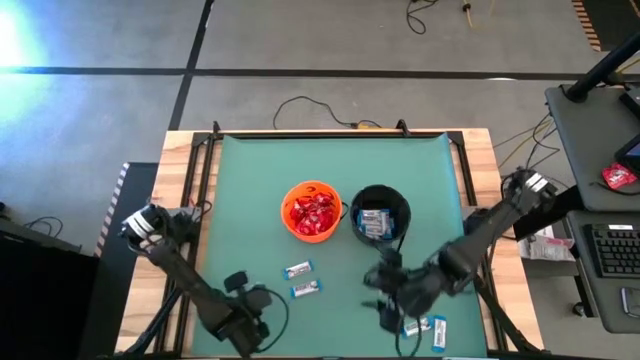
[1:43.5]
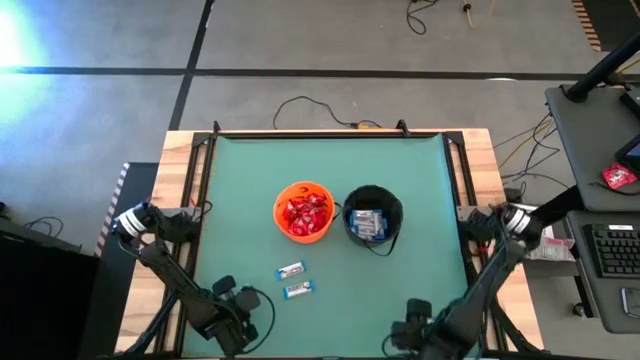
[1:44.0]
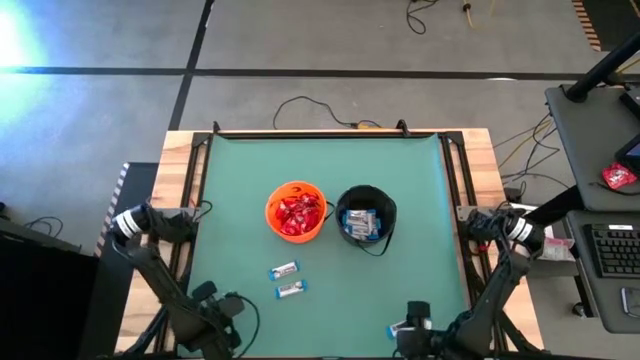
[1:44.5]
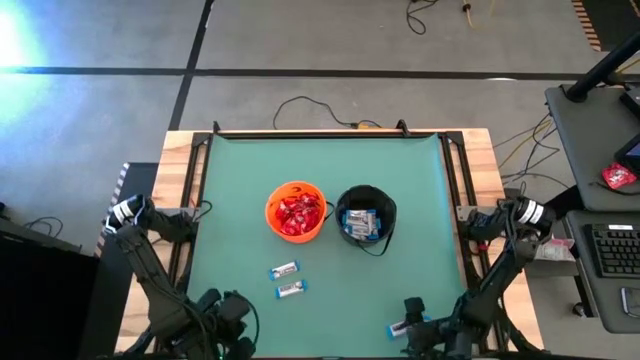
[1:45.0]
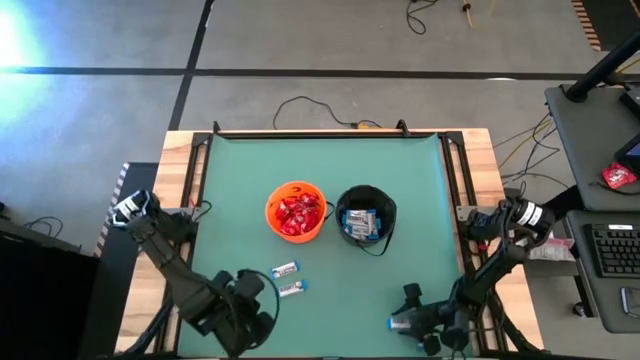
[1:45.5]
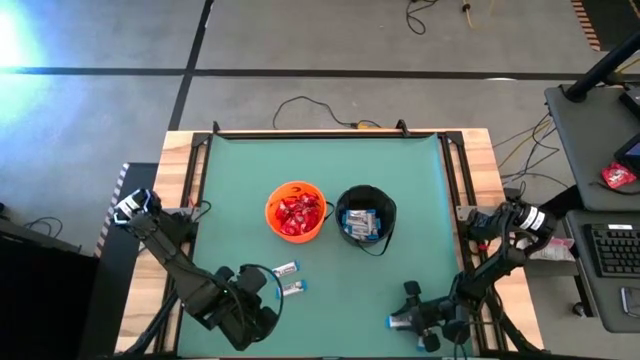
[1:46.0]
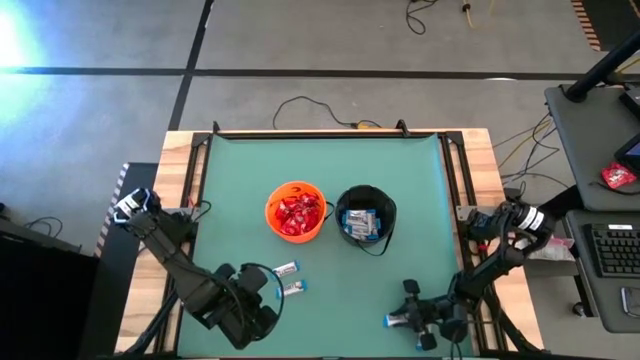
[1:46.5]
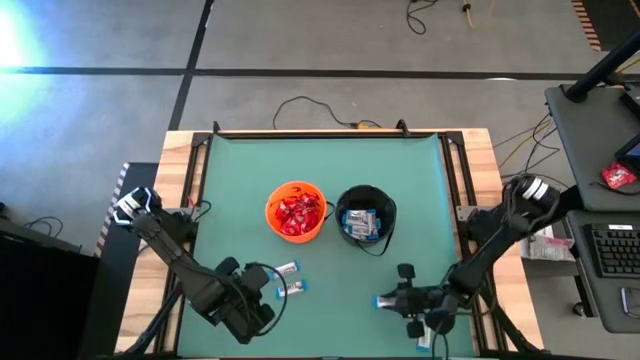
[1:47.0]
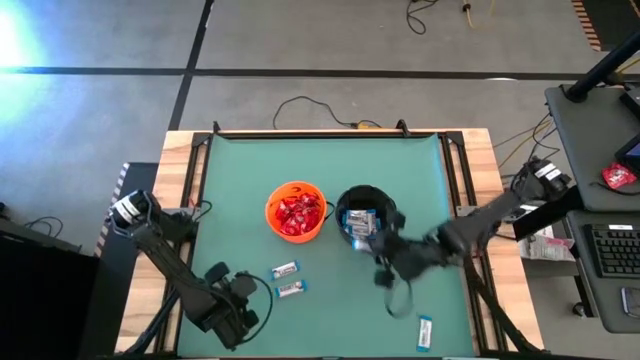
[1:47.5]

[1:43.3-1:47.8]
Task: Sort candy by brand, put in halloween buckets
Put the white chocolate into the black bucket

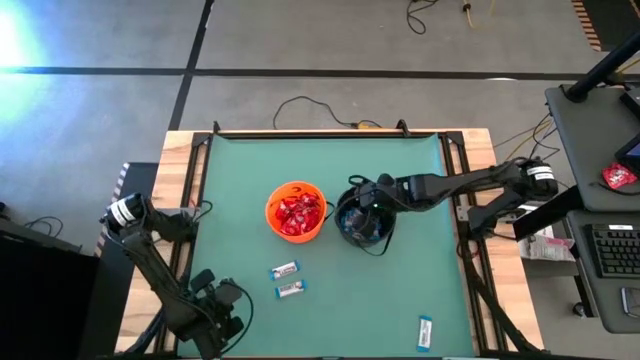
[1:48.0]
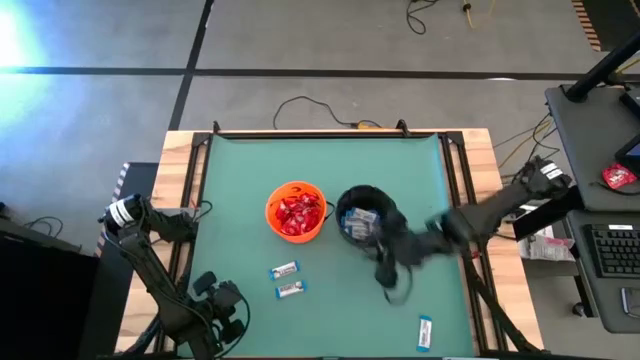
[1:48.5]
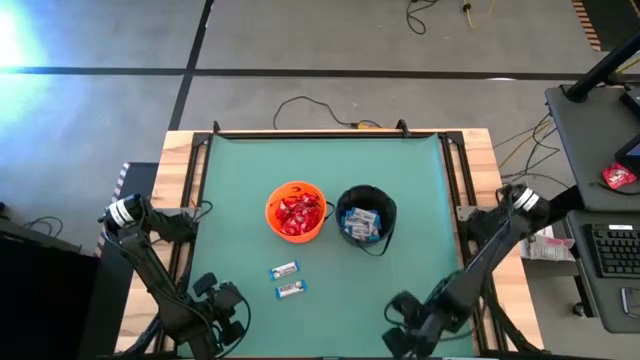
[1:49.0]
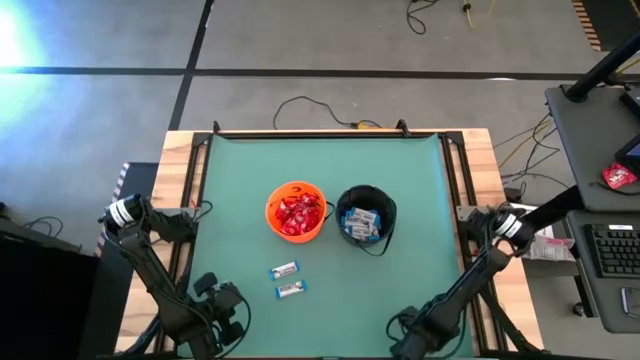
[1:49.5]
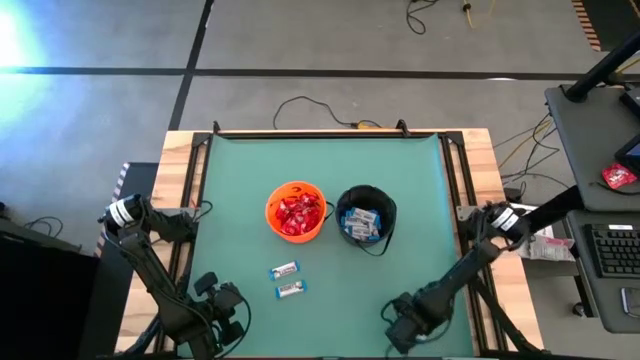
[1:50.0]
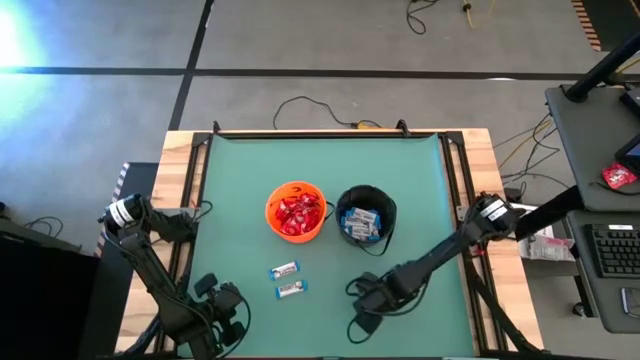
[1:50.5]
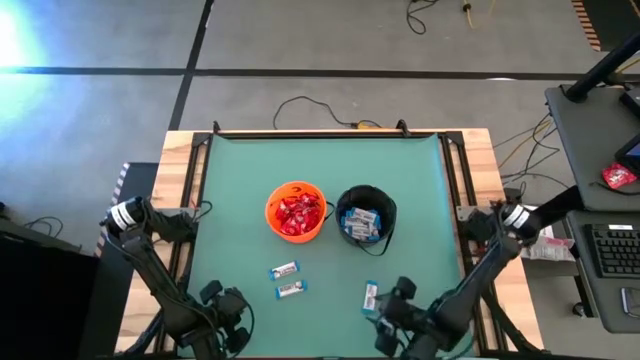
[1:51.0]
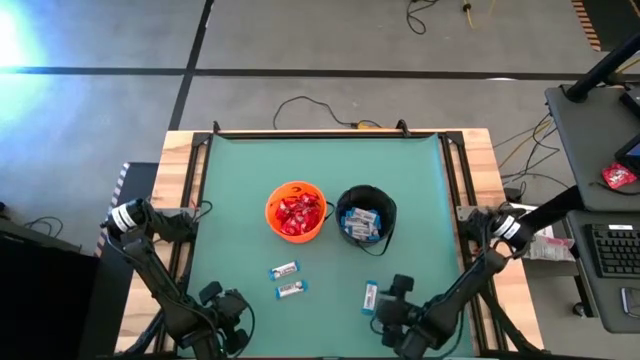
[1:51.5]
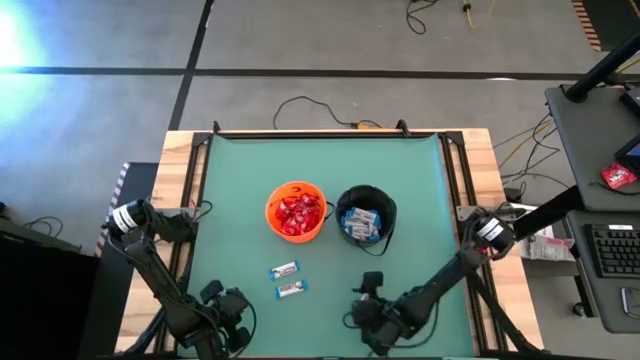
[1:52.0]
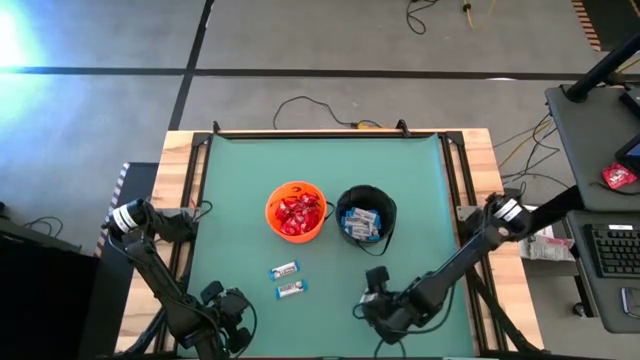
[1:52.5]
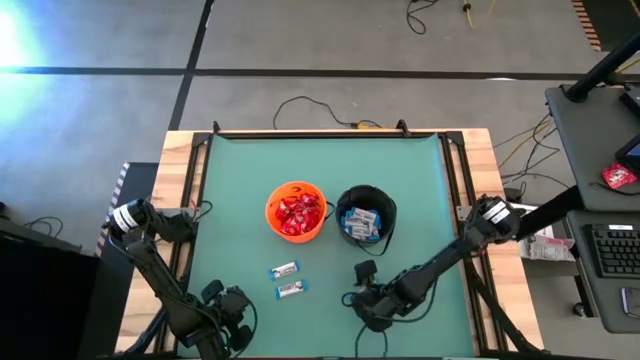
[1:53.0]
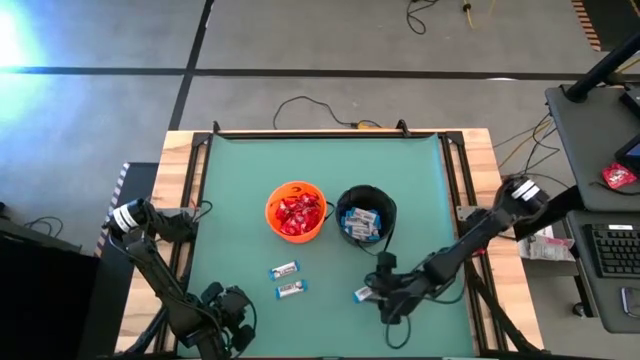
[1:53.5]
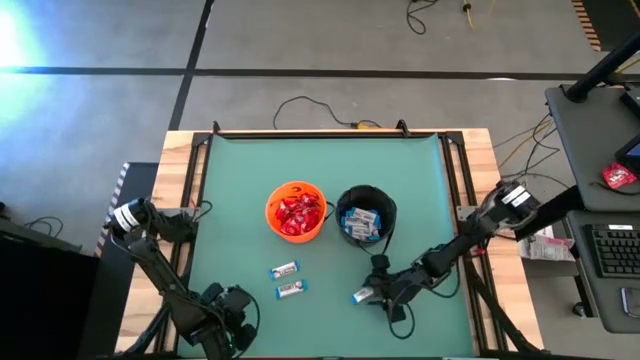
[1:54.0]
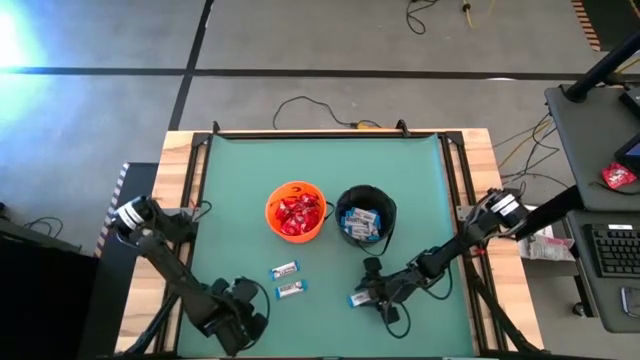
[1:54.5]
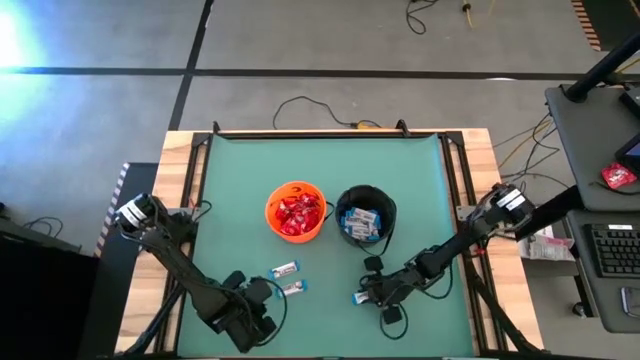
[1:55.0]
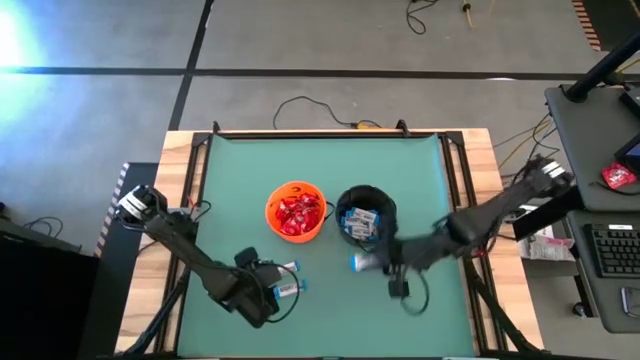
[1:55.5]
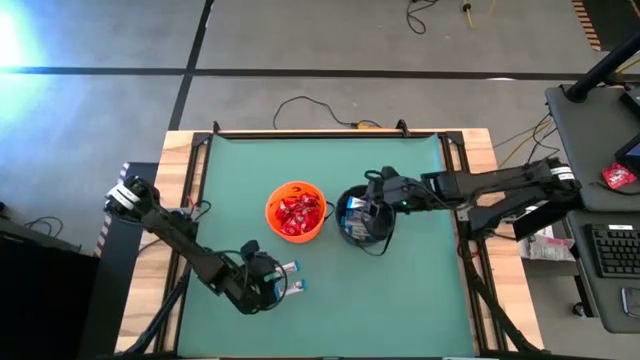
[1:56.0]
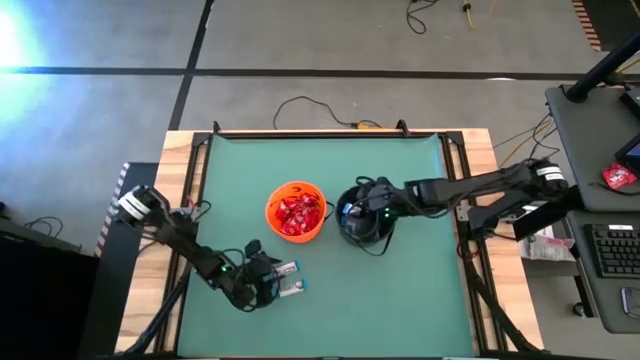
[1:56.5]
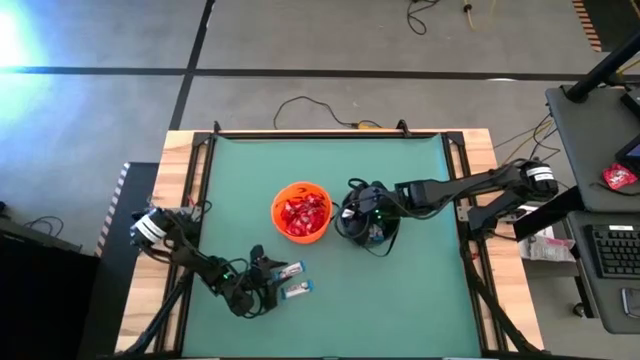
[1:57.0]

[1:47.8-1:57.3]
Put the white chocolate into the black bucket

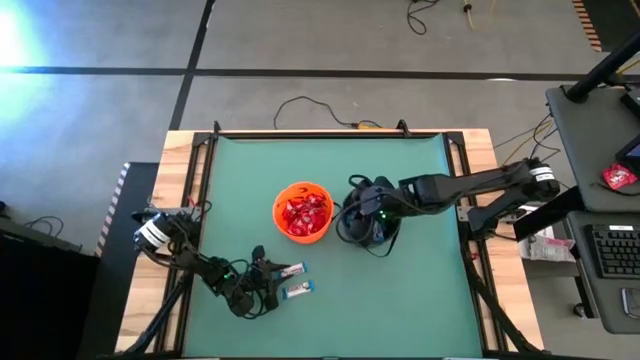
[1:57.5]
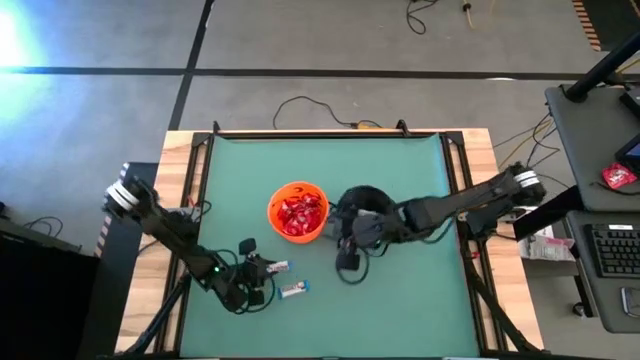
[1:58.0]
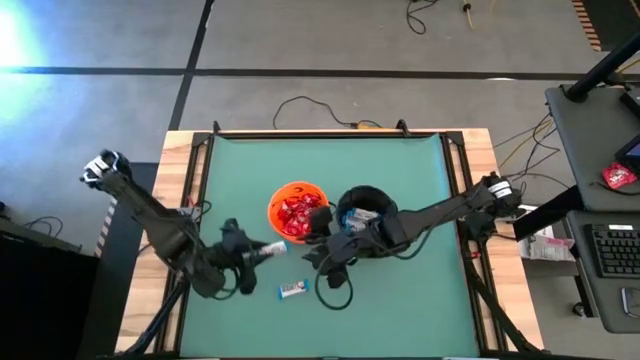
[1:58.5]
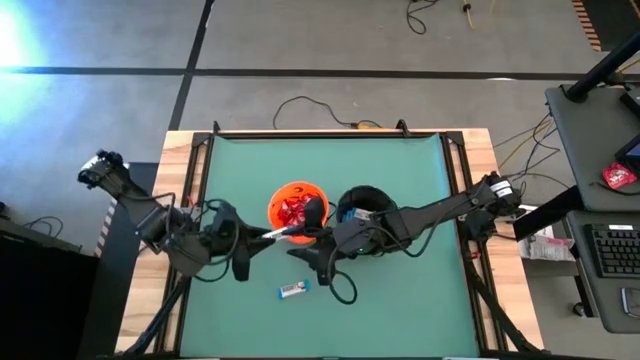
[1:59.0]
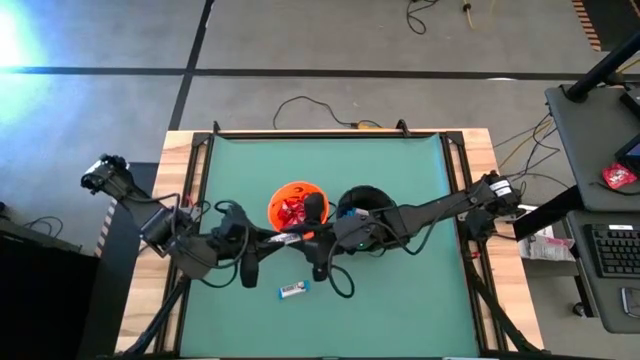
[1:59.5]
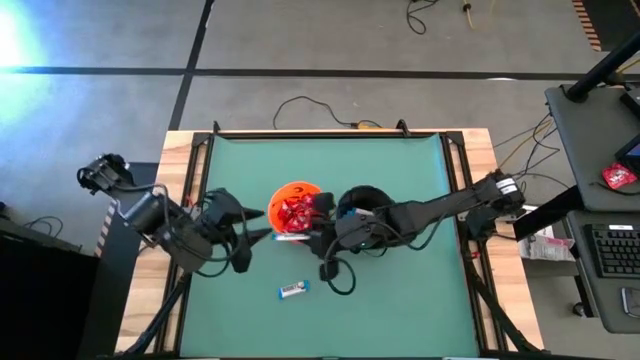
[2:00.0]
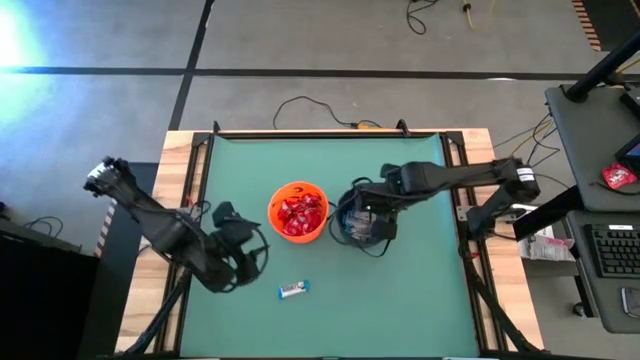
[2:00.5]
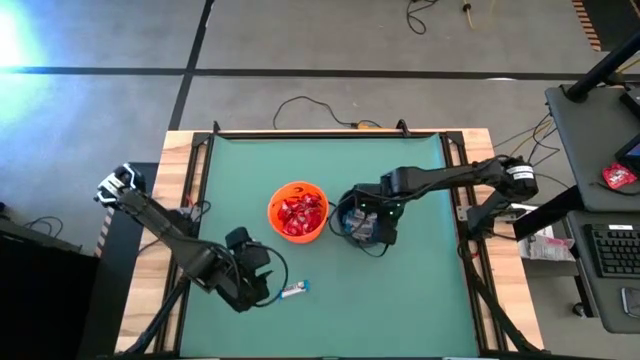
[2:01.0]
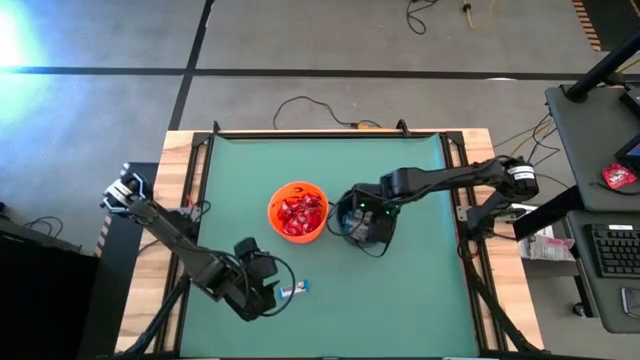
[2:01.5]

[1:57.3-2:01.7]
Put the white chocolate into the black bucket

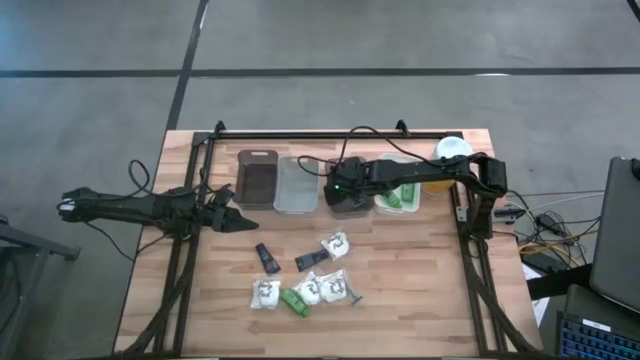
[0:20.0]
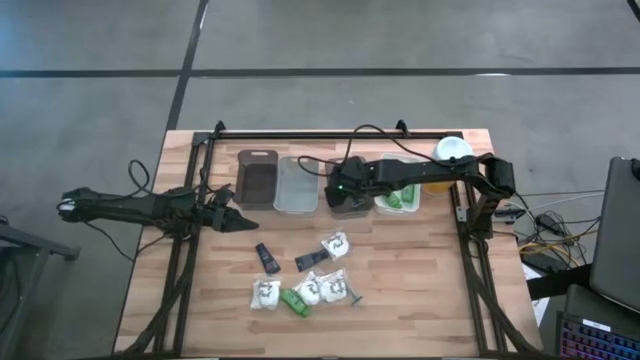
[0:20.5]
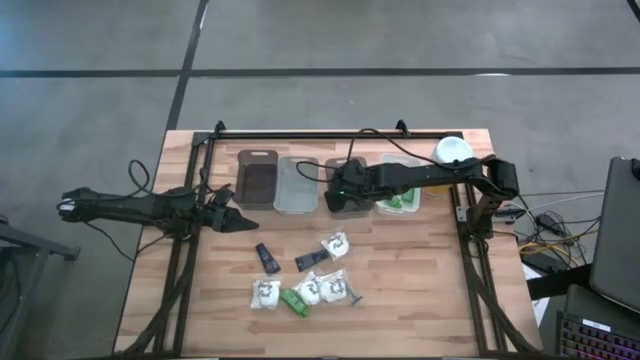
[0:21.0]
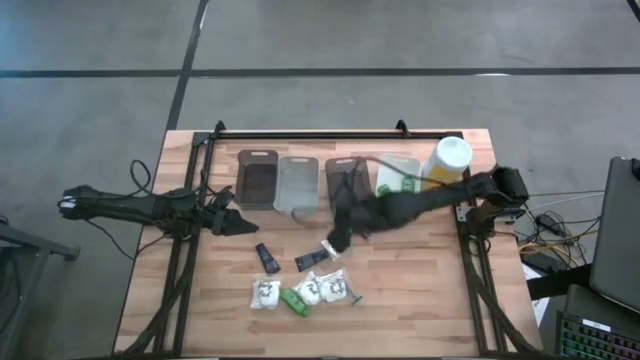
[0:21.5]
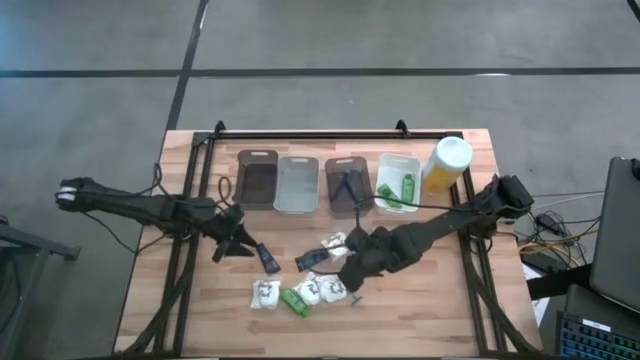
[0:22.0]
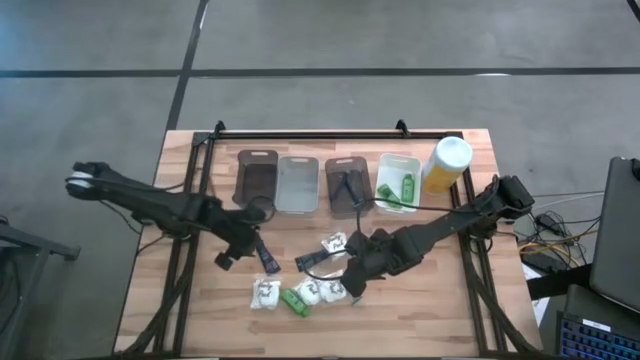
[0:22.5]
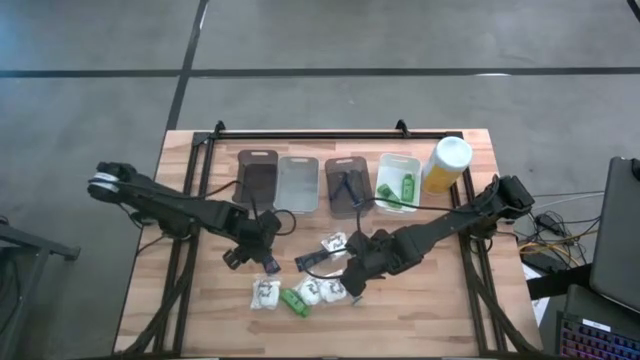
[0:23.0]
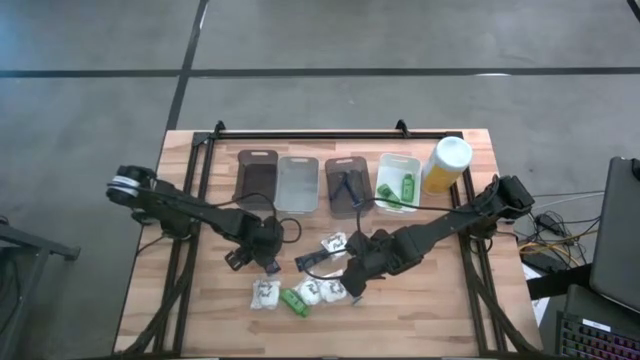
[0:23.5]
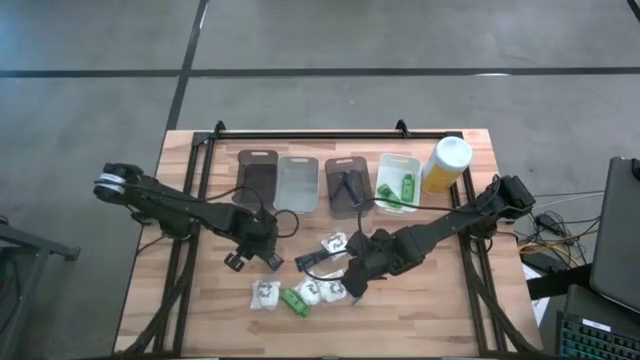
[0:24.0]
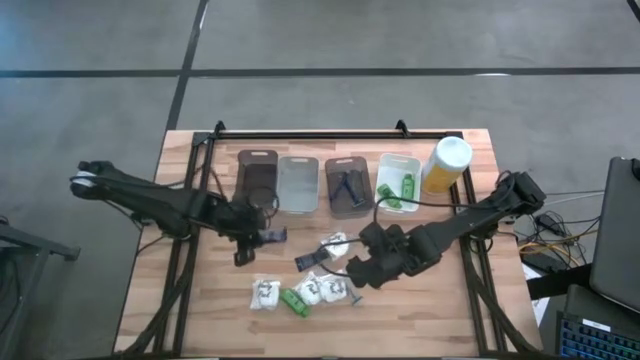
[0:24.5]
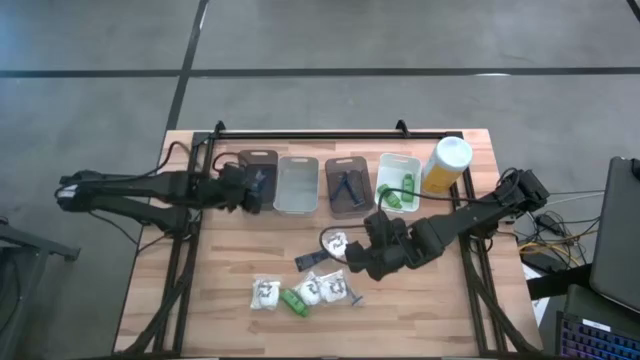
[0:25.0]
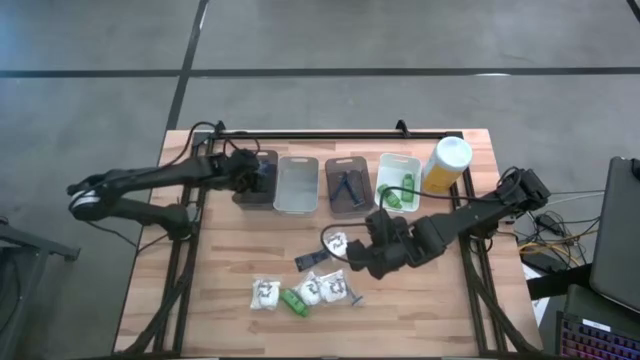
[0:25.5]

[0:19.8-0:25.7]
Task: Pick & Place Travel size toiletries
Put the blue shave cream into the left black bin
